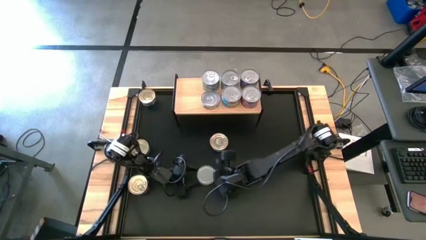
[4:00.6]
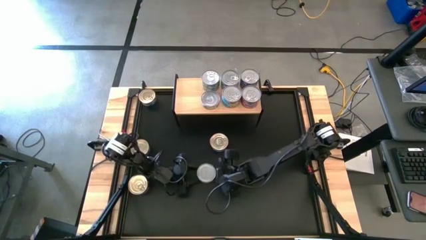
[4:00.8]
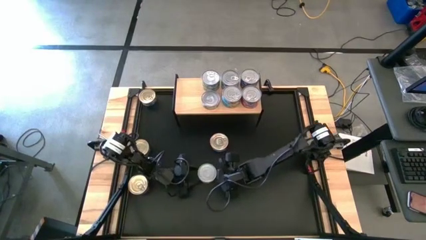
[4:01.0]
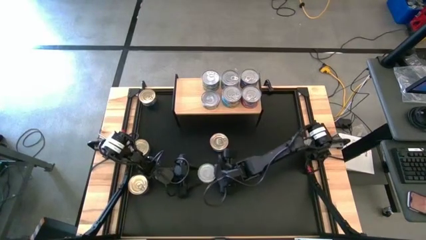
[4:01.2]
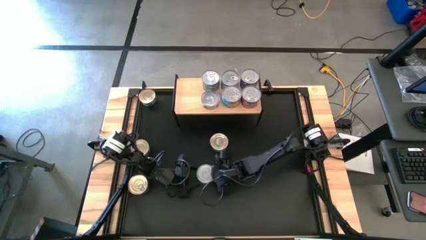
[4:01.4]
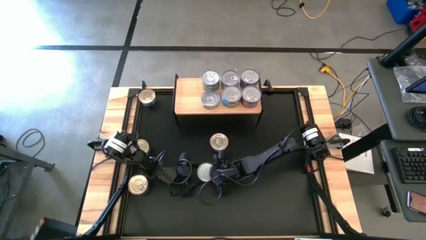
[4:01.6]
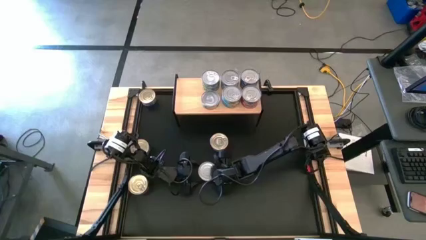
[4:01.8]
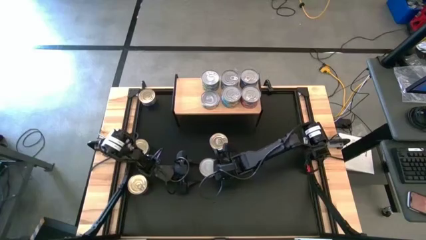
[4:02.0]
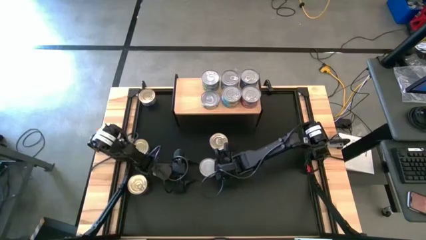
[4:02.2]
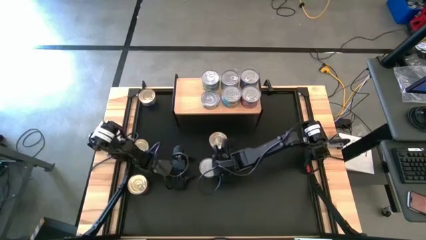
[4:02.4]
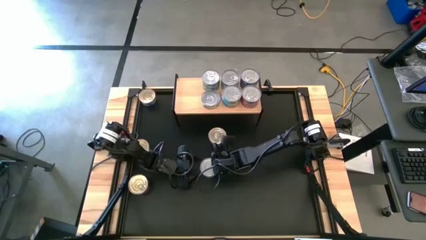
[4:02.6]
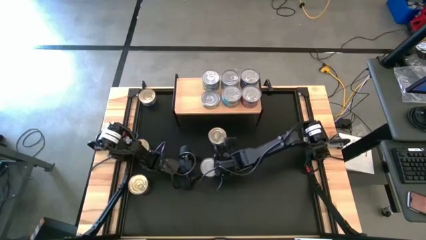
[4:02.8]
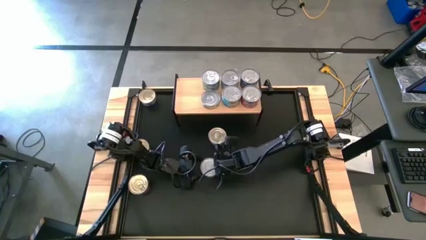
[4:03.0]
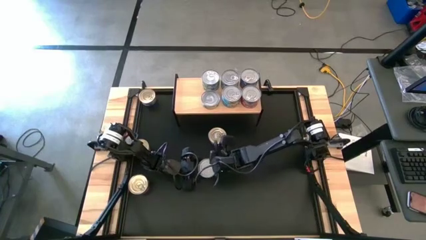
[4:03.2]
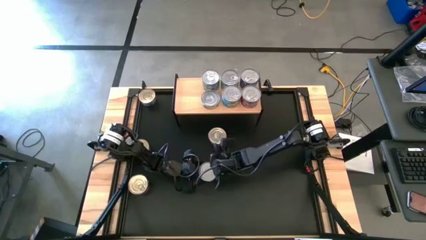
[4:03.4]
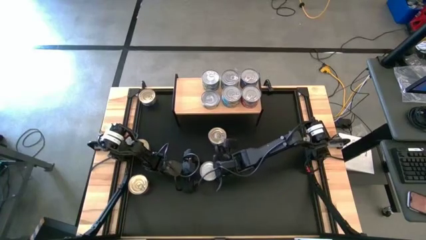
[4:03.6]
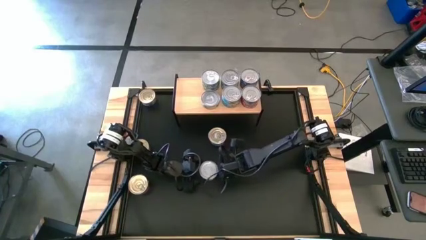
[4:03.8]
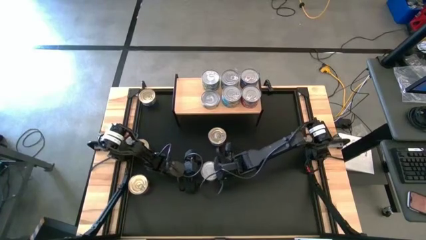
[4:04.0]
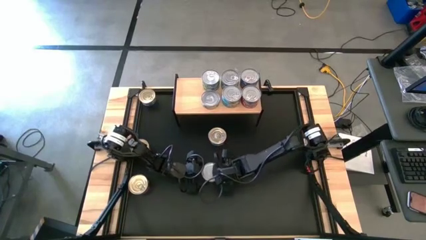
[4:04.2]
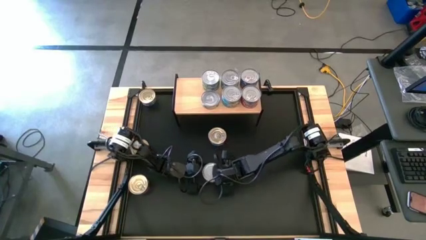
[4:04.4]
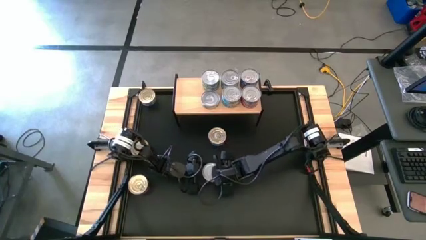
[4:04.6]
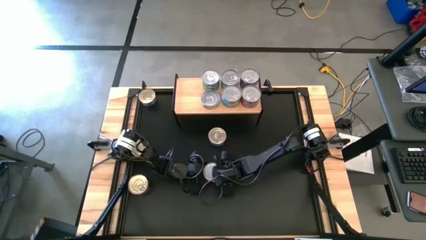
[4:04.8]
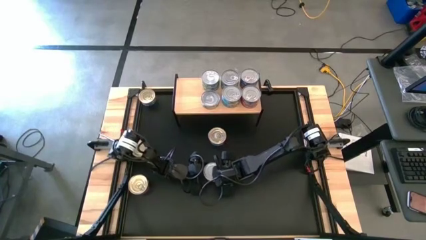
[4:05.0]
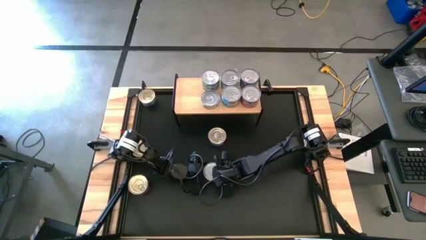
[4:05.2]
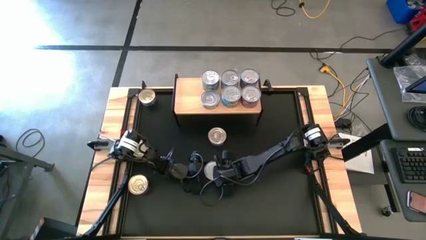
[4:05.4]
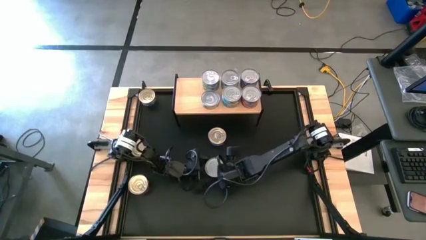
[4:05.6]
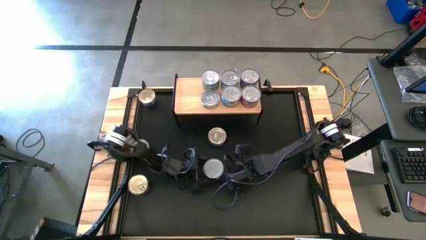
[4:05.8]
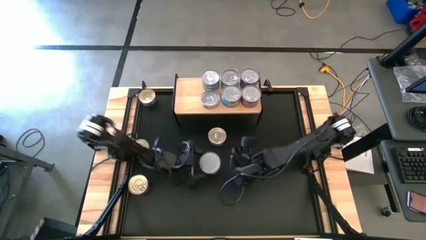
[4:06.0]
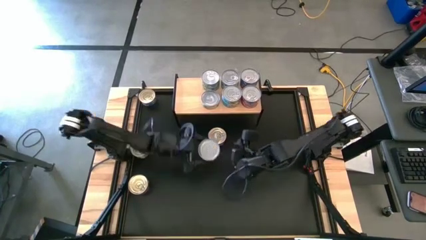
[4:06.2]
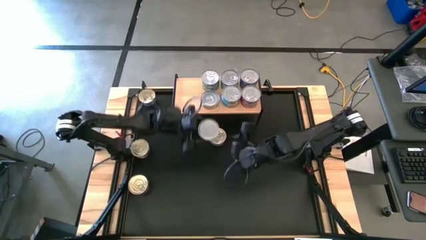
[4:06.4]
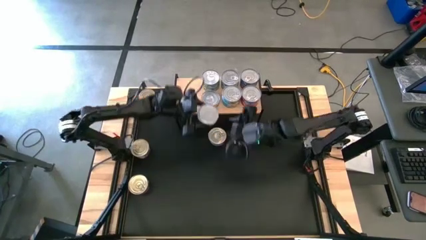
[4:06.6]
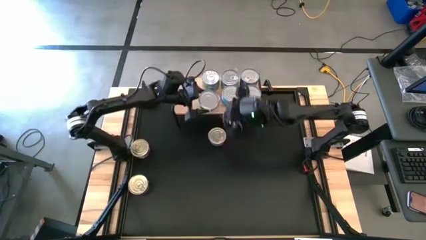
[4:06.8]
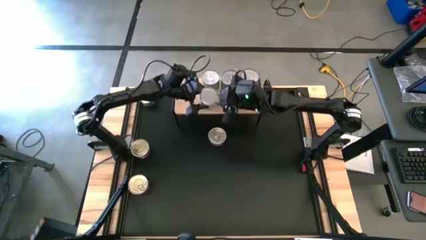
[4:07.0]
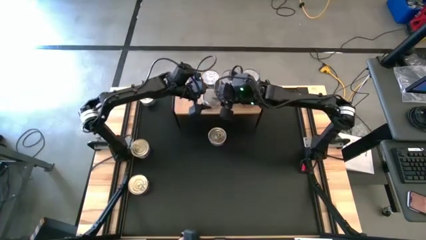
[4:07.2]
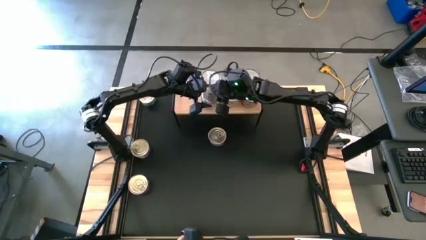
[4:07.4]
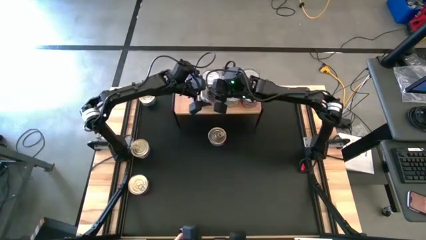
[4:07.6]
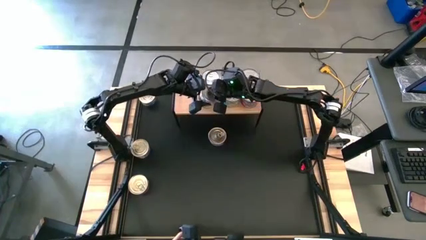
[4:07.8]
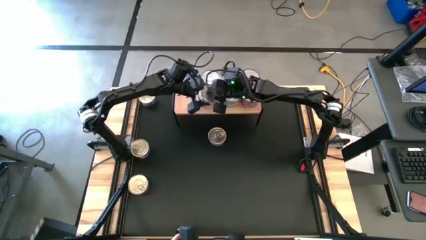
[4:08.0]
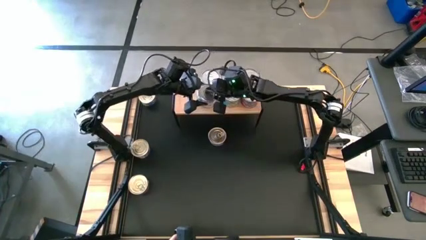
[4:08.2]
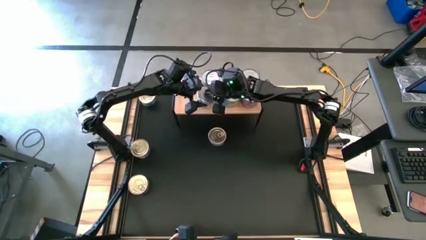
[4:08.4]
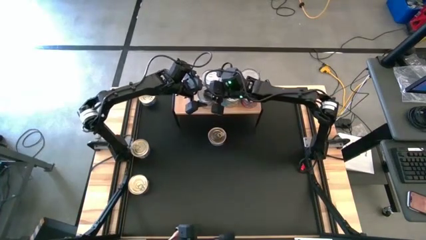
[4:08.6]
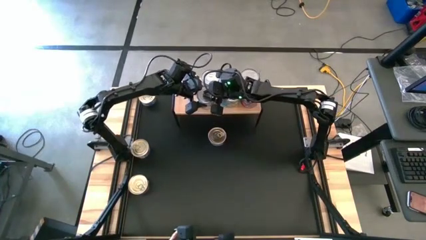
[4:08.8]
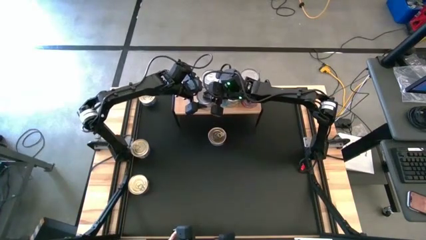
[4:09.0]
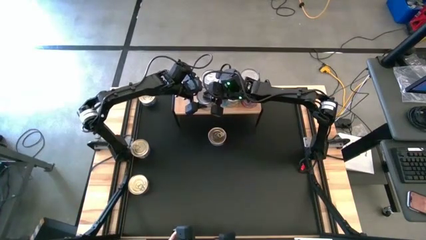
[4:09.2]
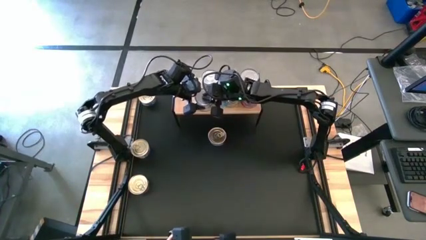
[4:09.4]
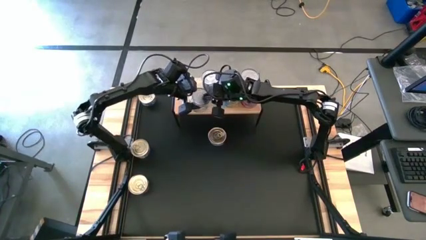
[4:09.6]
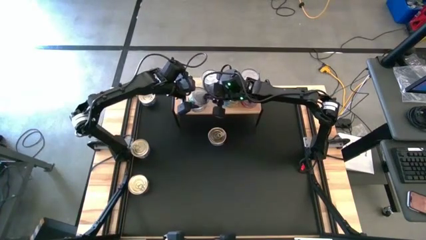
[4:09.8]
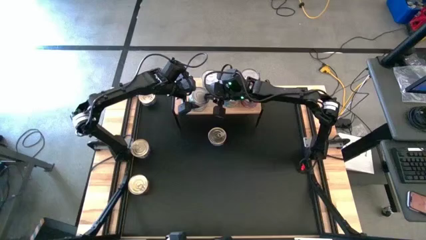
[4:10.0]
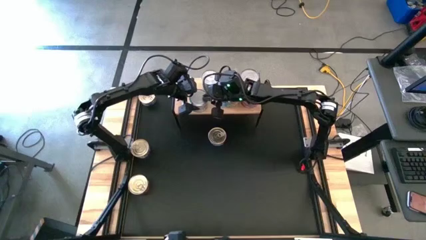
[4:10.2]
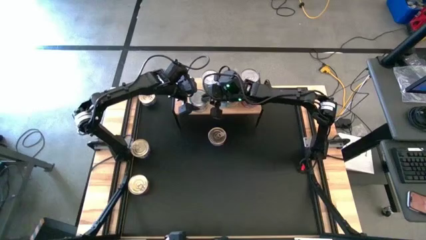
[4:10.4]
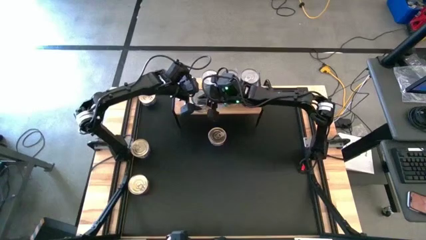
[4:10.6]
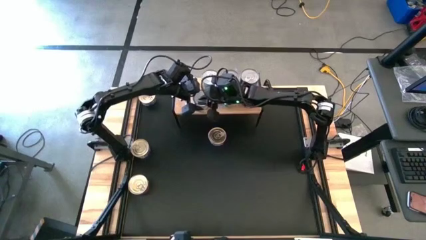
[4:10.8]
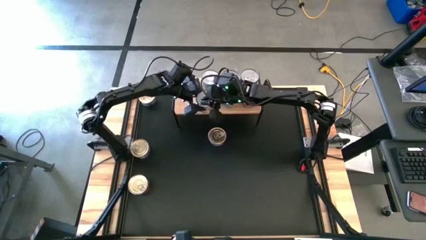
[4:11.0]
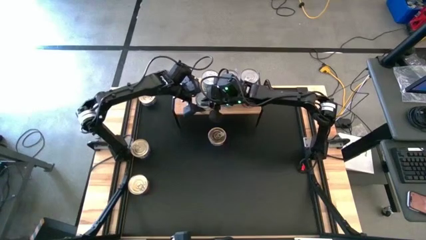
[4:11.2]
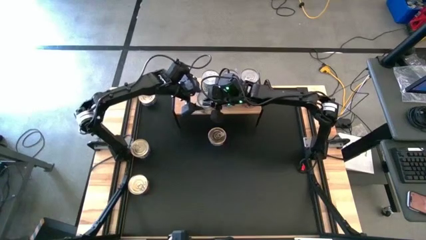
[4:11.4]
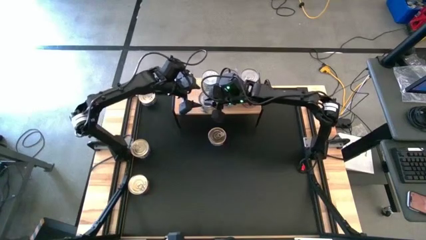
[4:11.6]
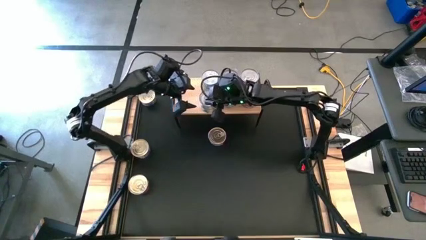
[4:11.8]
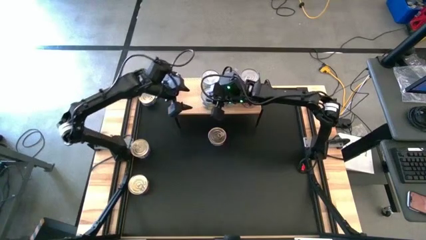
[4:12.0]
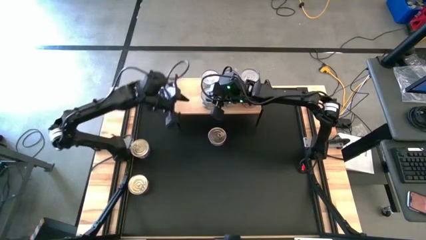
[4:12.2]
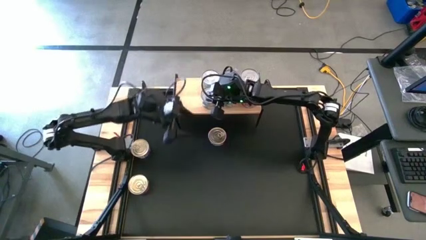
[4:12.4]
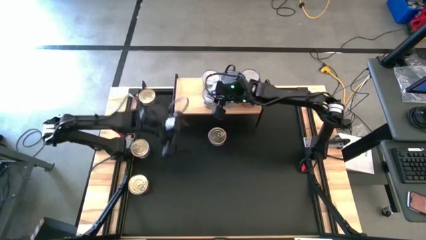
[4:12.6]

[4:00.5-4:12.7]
Task: Stack canned seafood by type on shelf
Stack the green white tuna can on top of the other green white tuna can on the shelf
